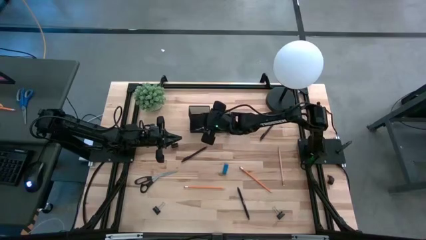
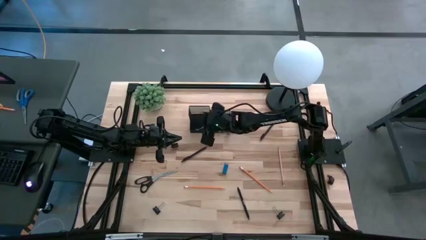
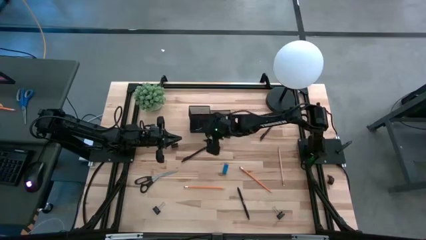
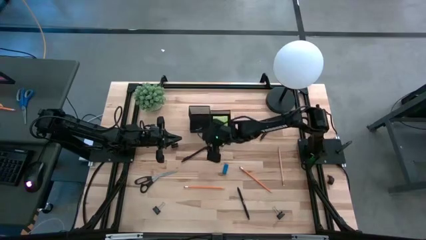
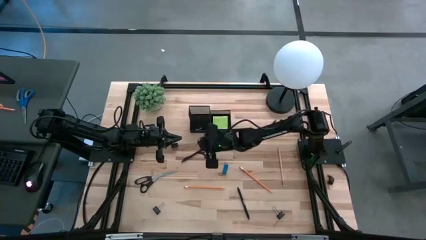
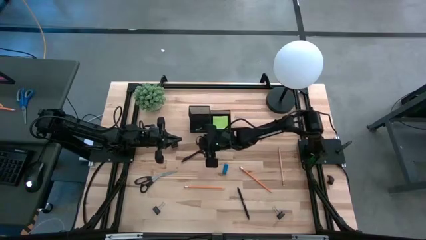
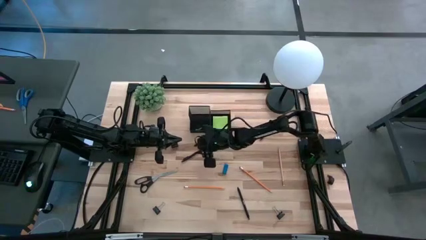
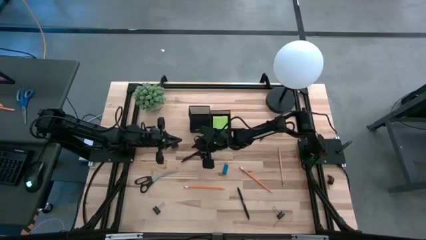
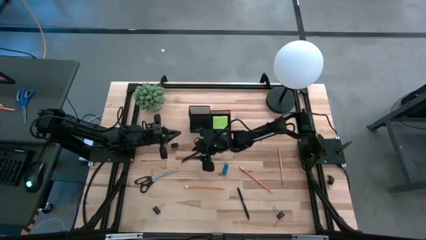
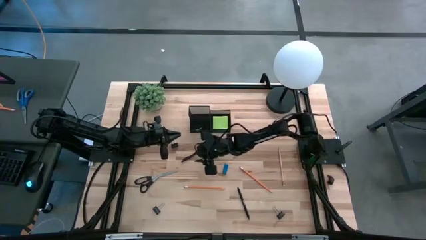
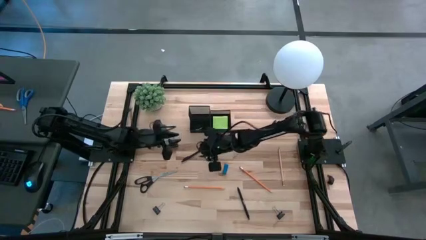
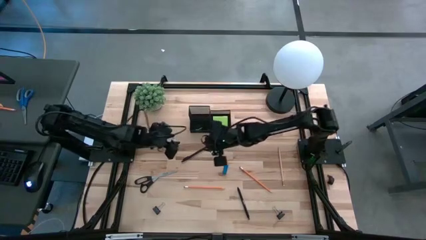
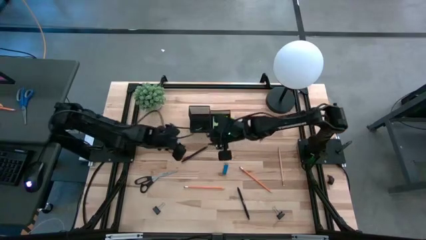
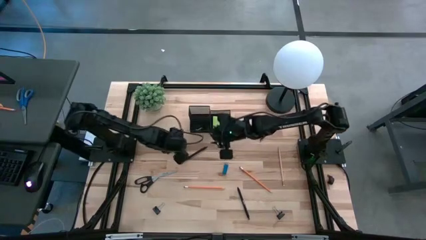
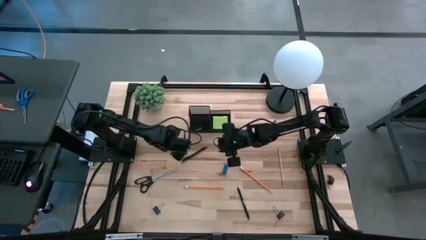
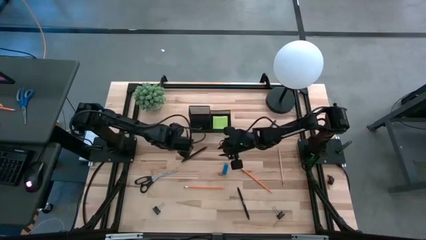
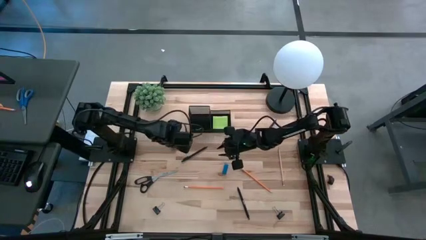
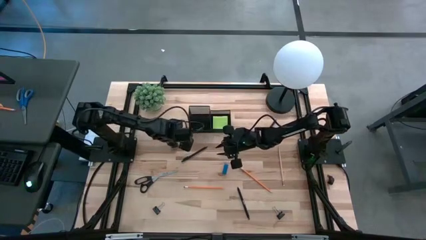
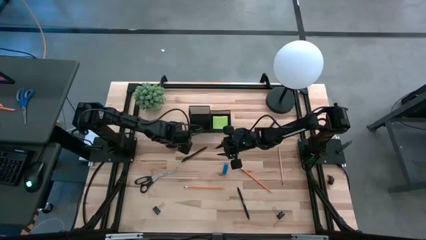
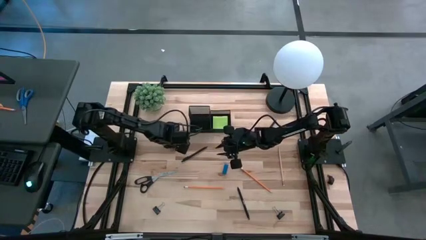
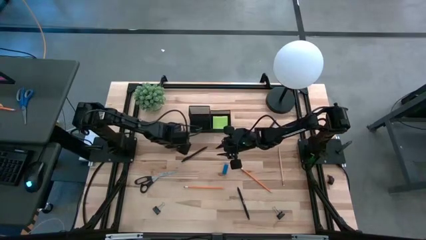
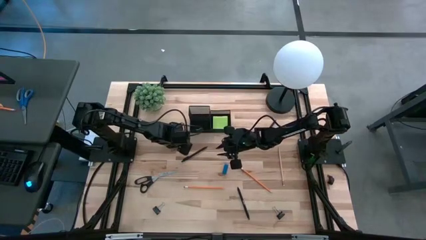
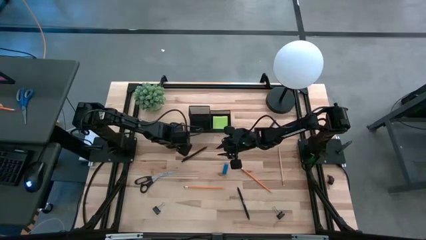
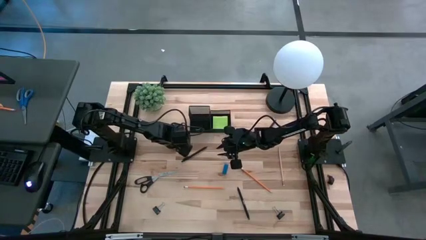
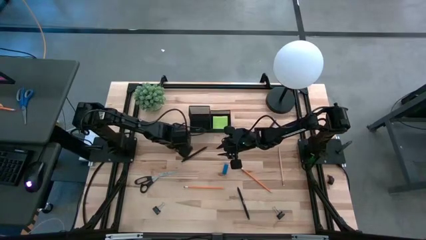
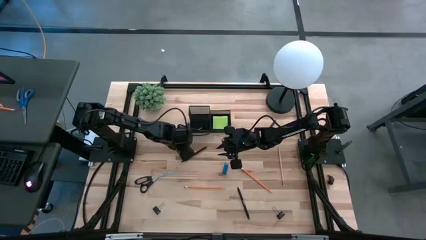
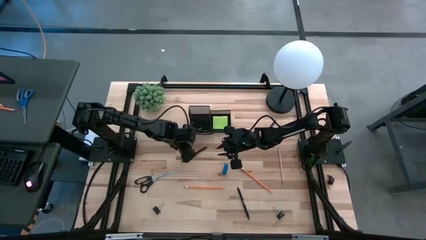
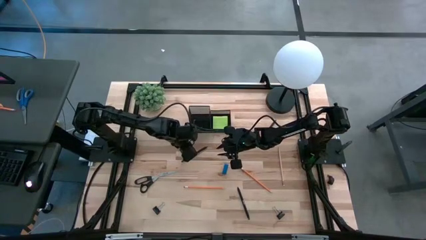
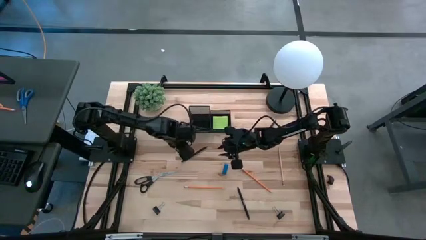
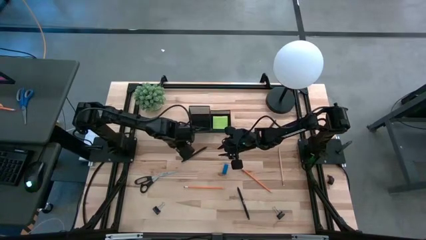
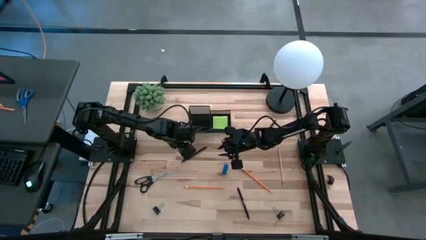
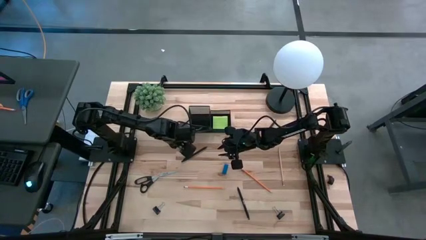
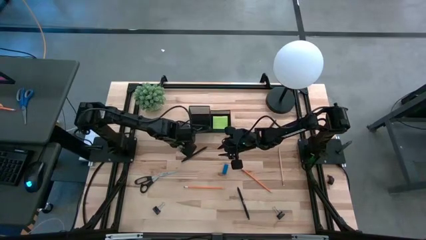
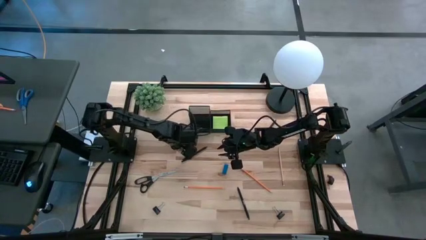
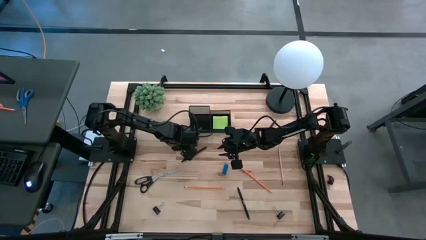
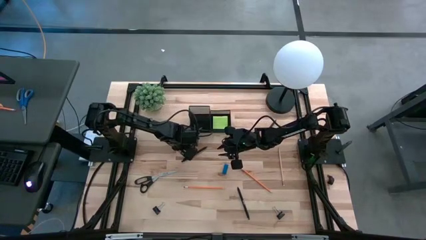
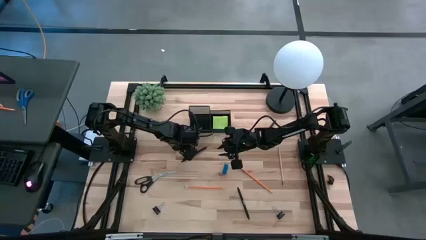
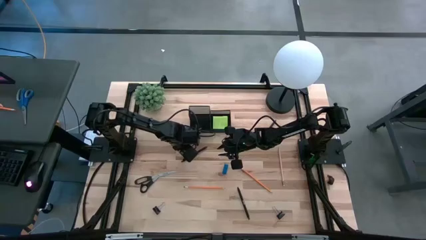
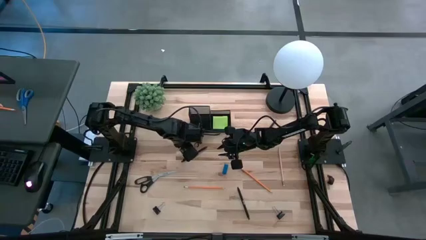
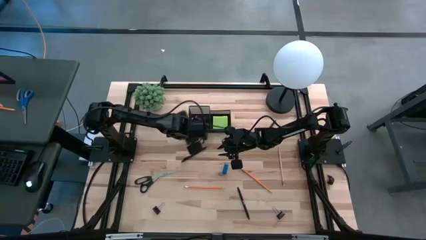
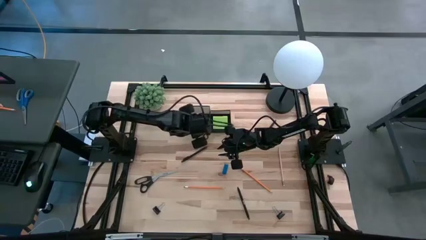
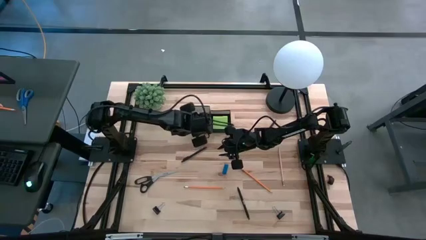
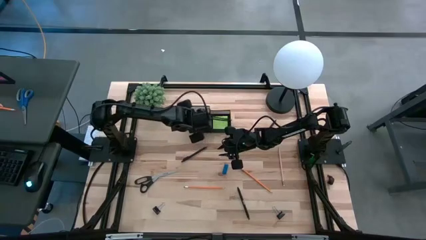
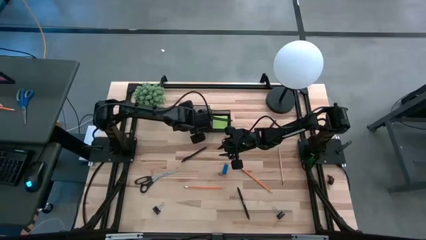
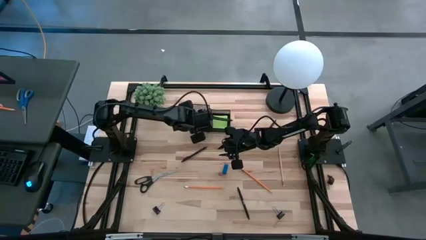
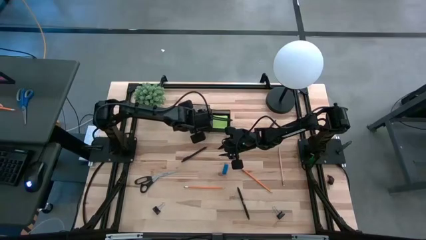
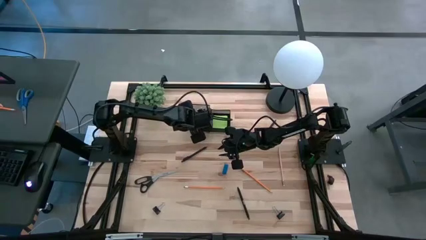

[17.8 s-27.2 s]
Task: Pick and place office supplies into organizer
Put the top left clip binder into the organizer bin

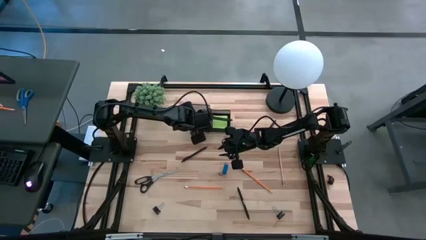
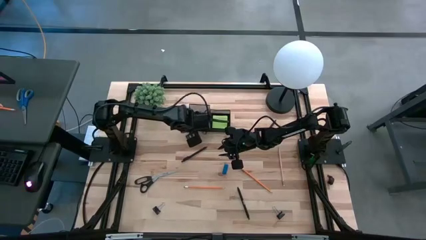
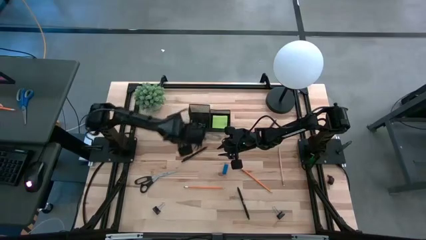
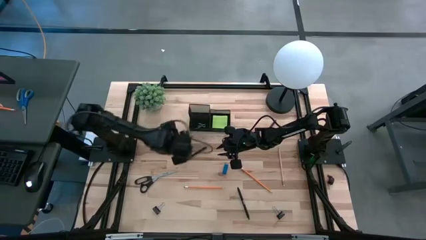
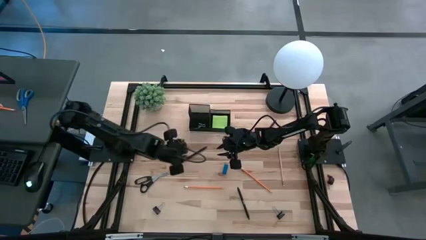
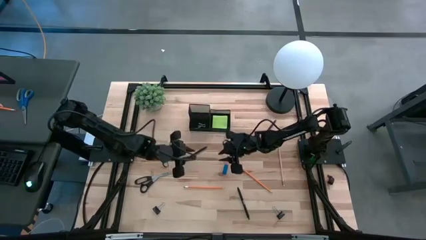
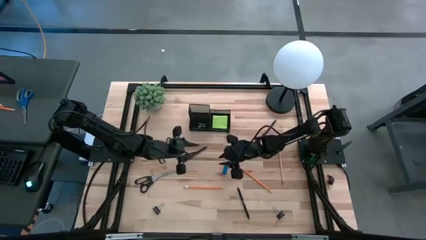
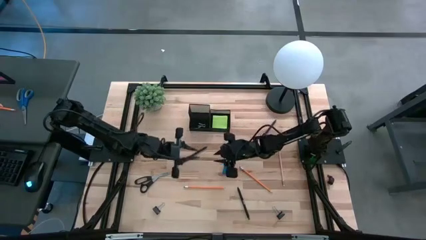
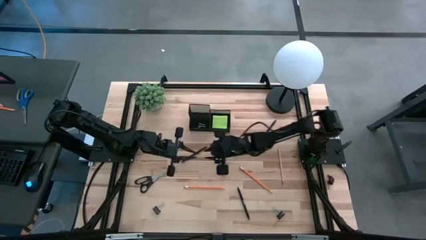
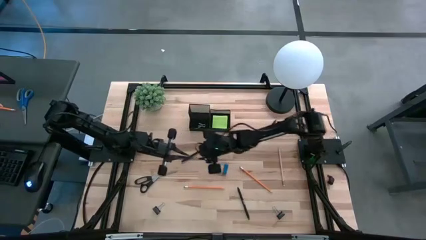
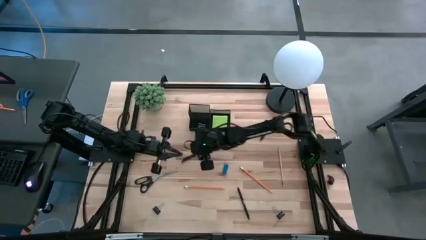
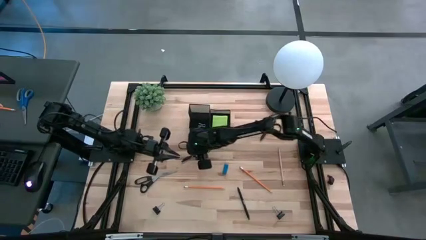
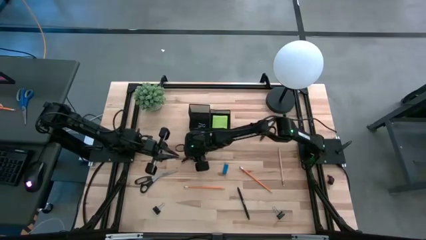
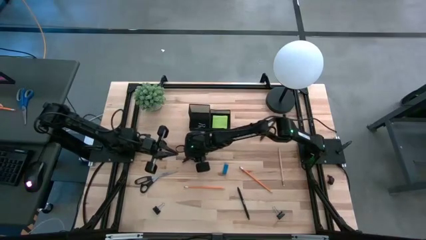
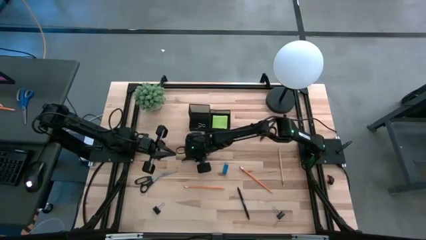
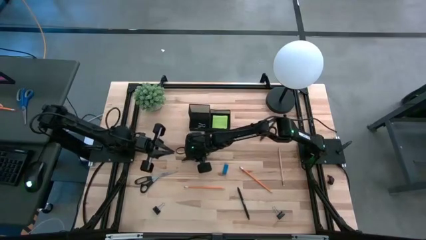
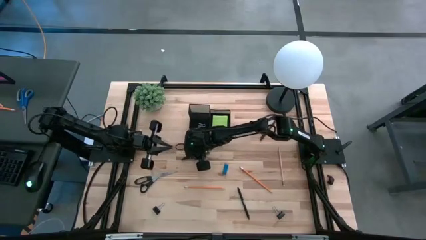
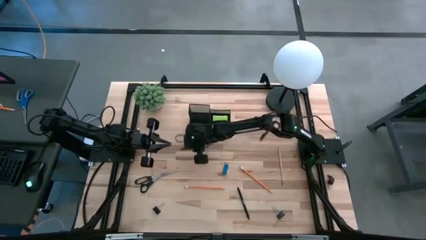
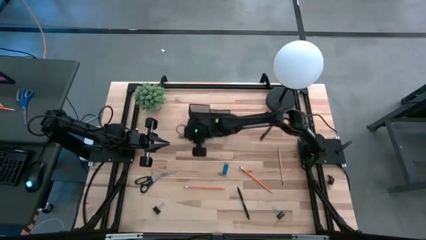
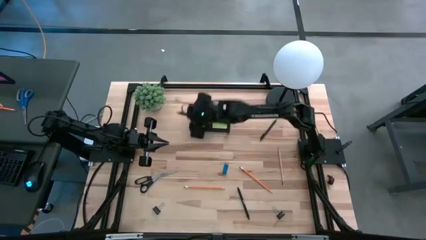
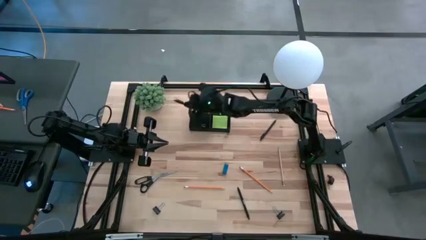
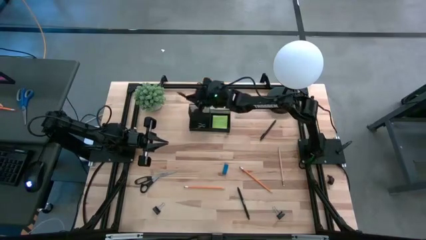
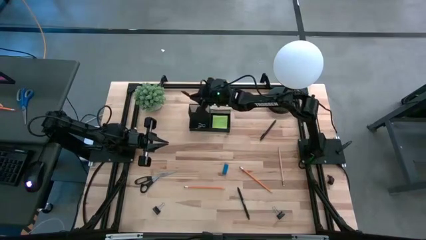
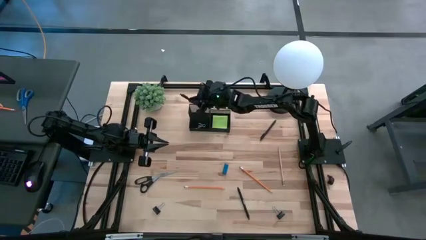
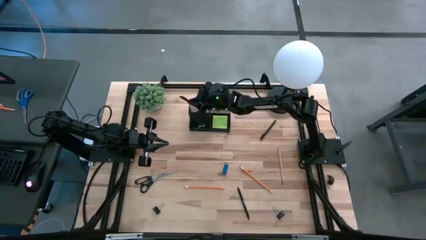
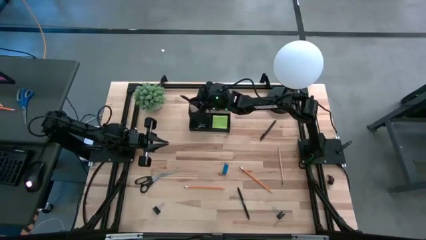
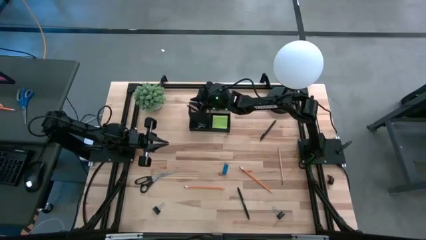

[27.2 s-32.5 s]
Put the middle left black ball pen into the organizer bin

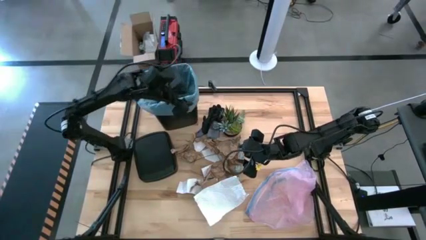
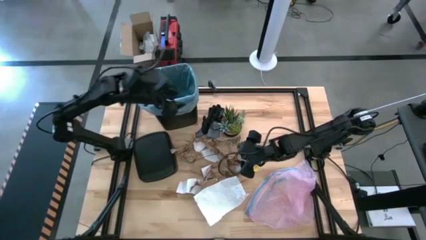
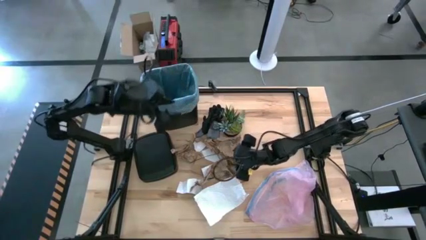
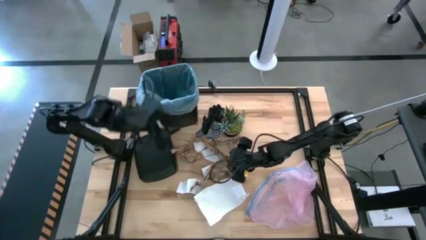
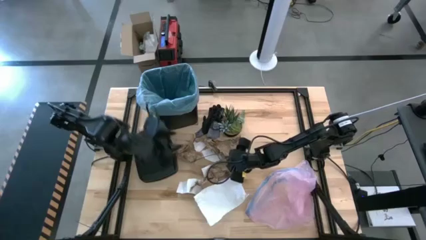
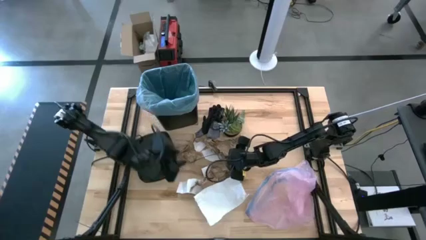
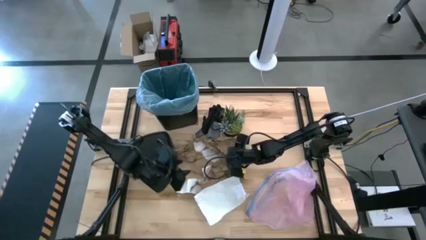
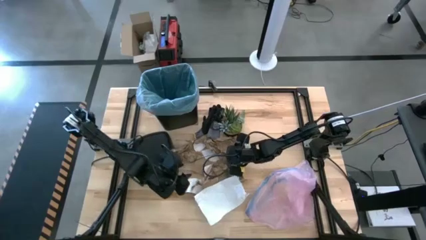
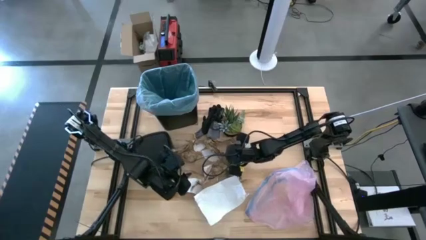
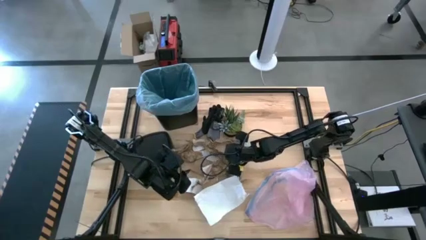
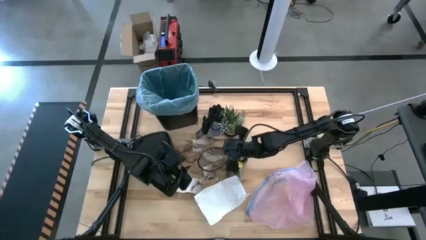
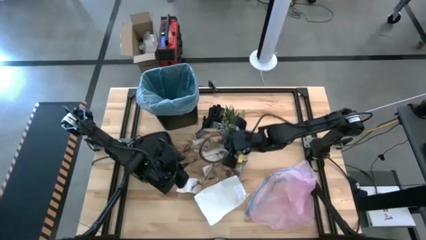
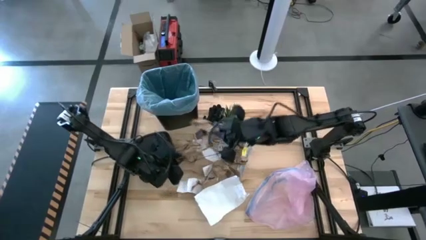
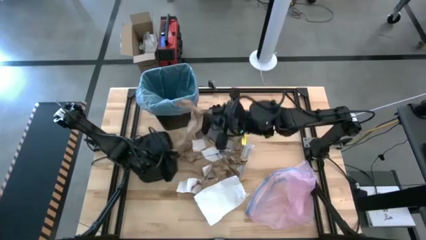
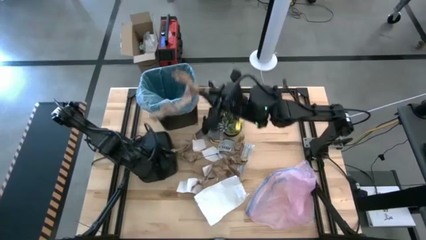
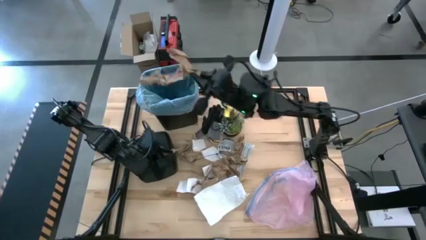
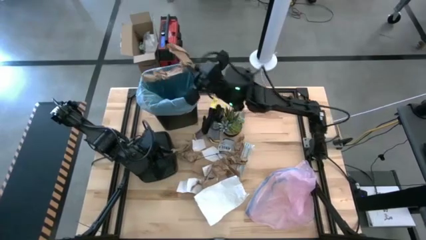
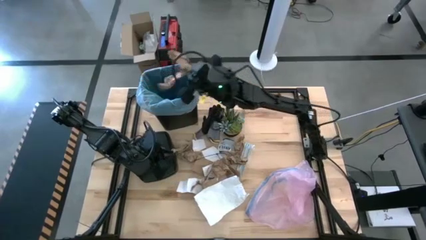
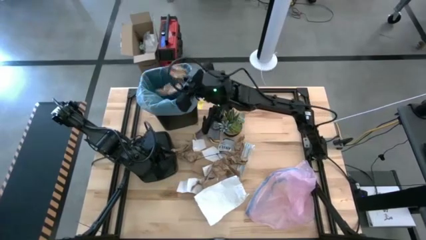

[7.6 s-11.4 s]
Task: place trash/remove bag and relplace
Put the brown napkin into the trash bin
